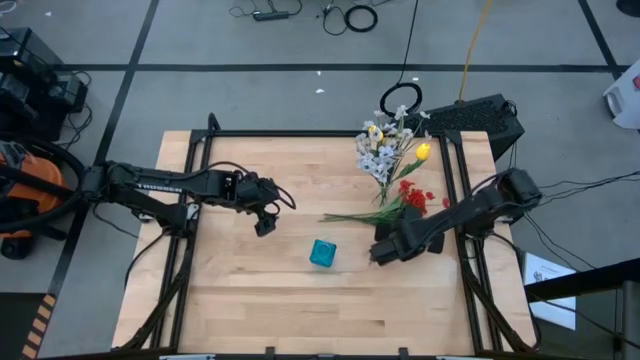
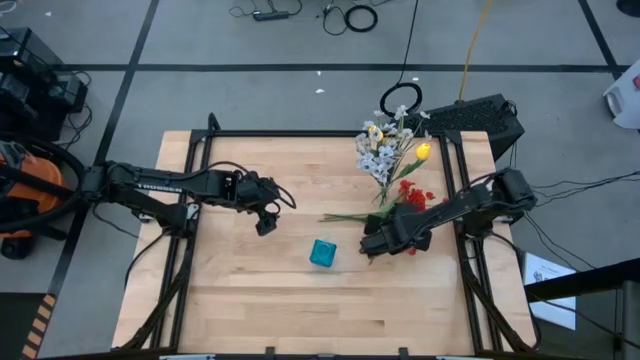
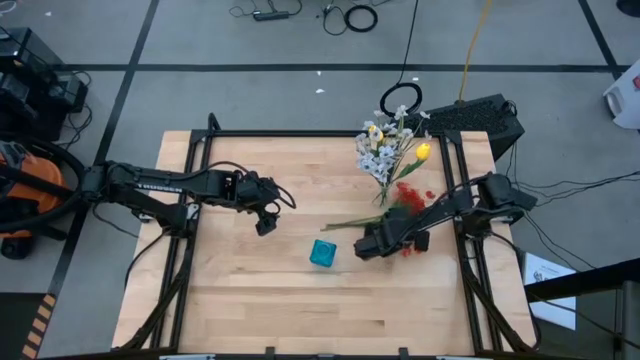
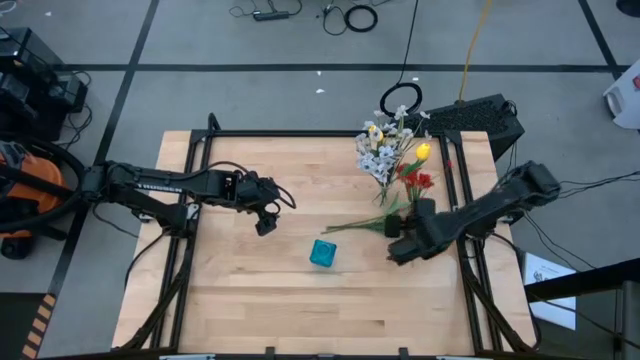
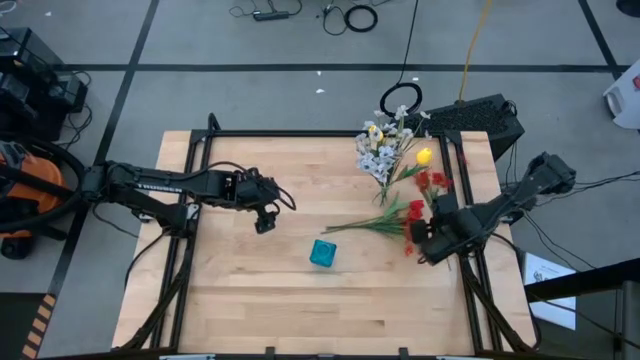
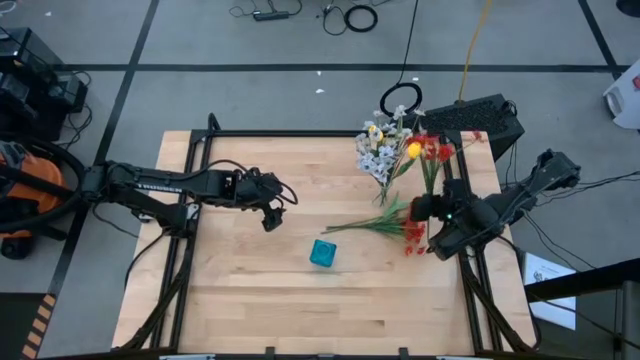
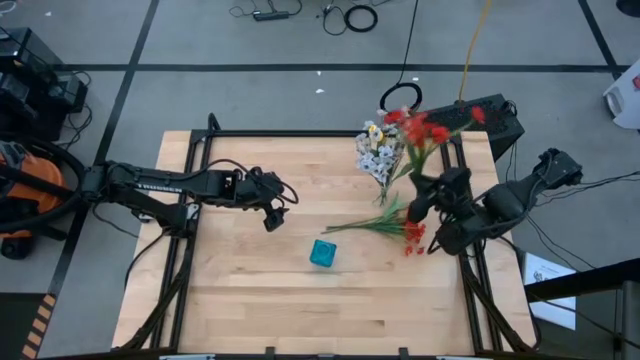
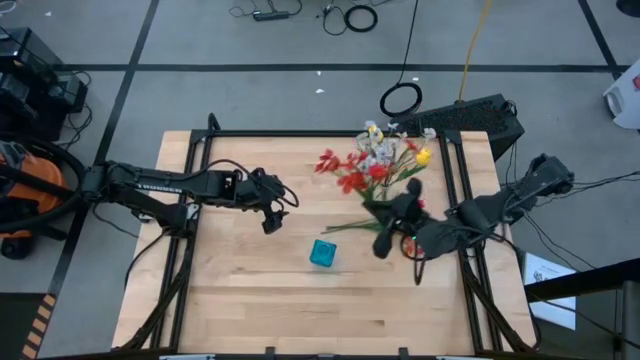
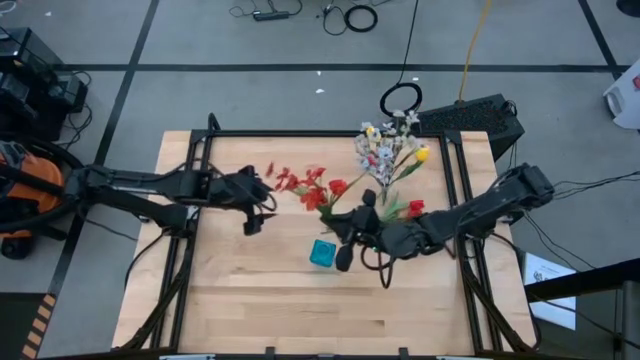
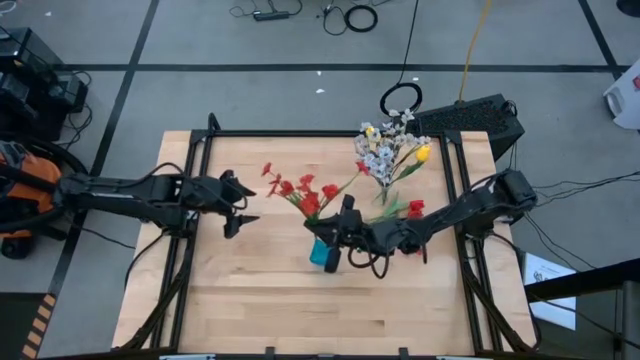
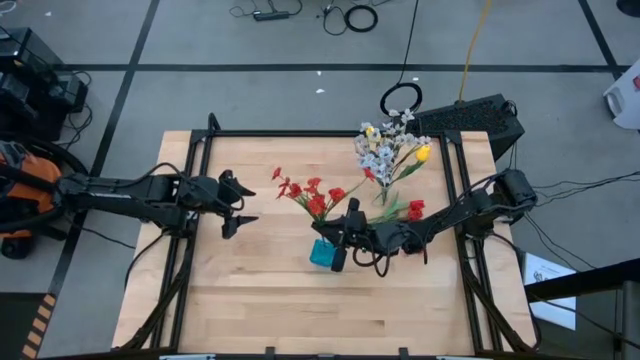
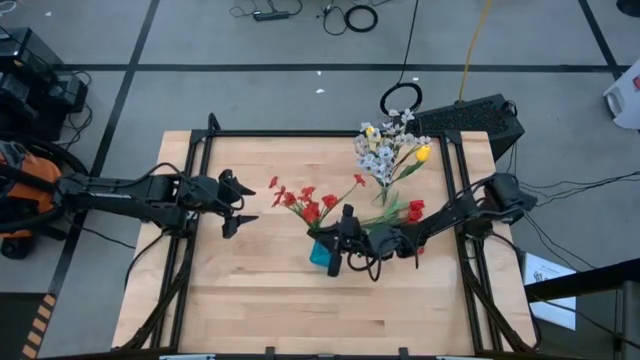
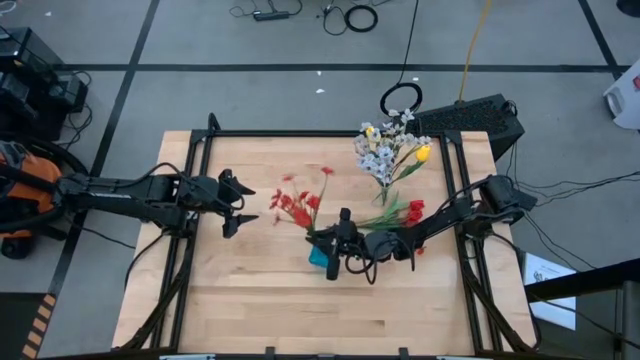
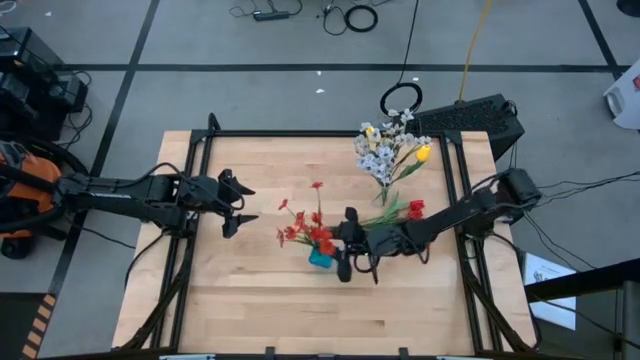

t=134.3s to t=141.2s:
Task: Sort flowers into vase by color
Put the bottom orange flowers into the blue vase

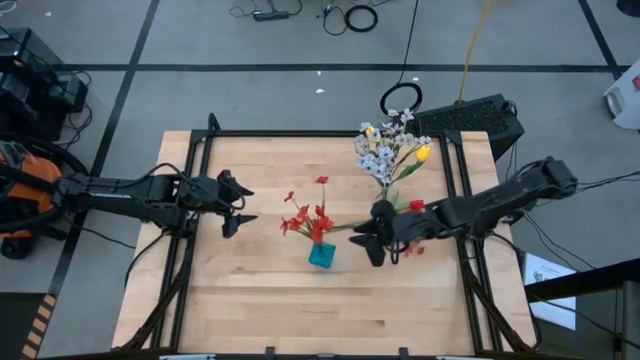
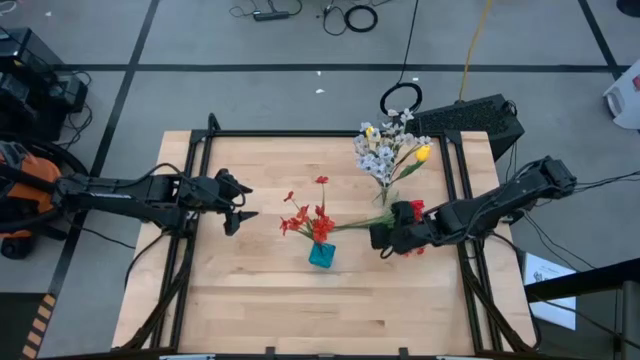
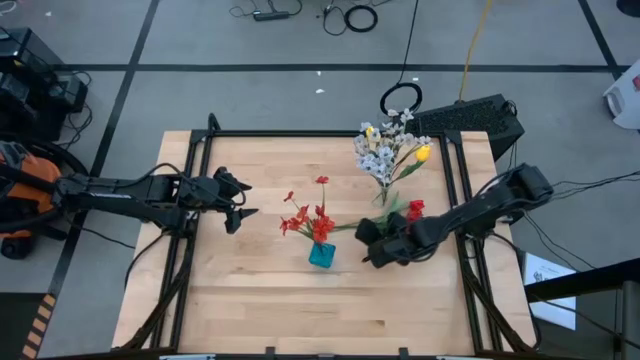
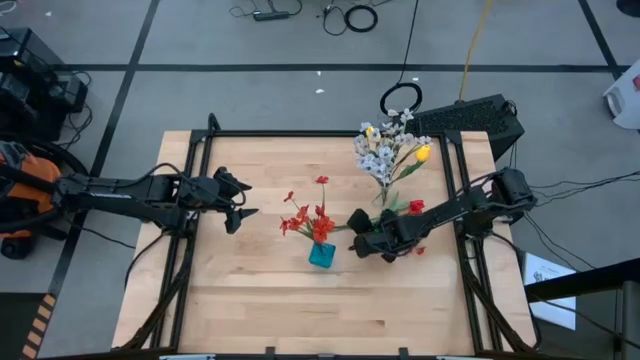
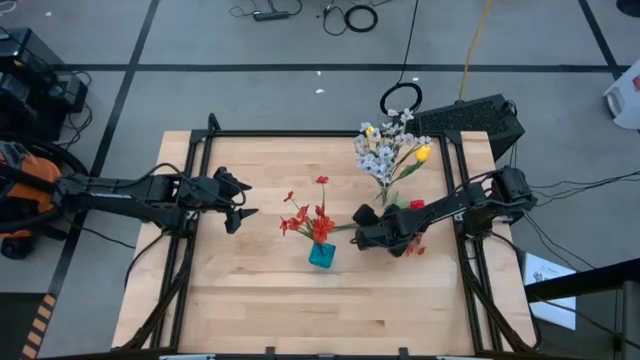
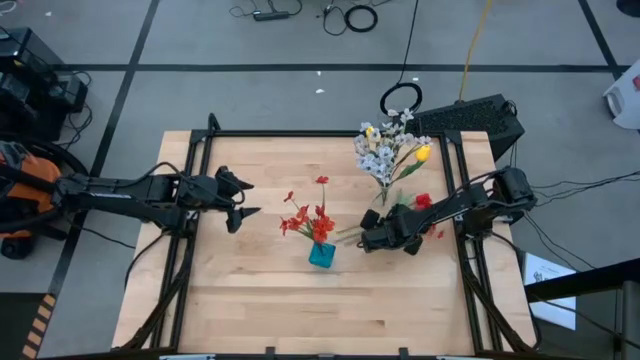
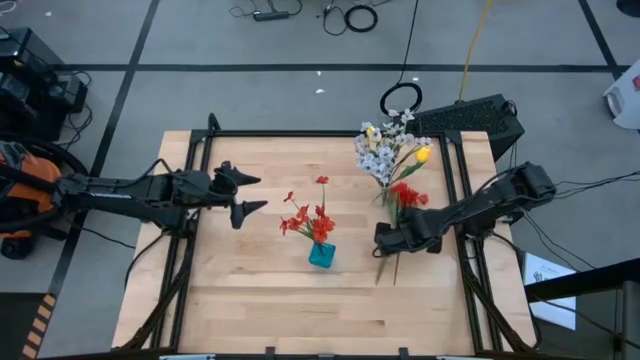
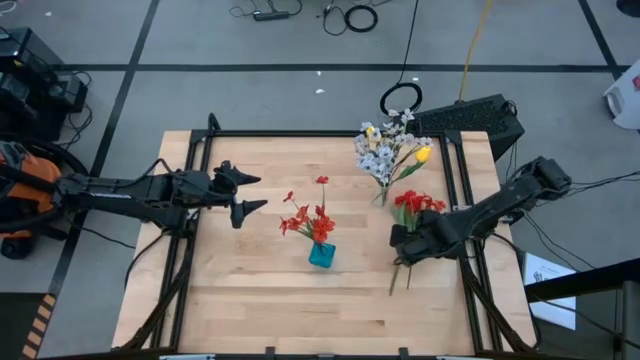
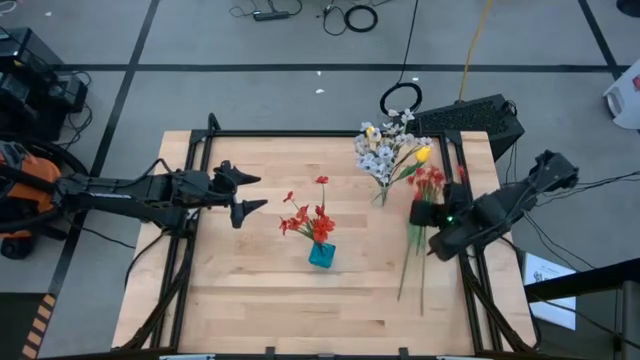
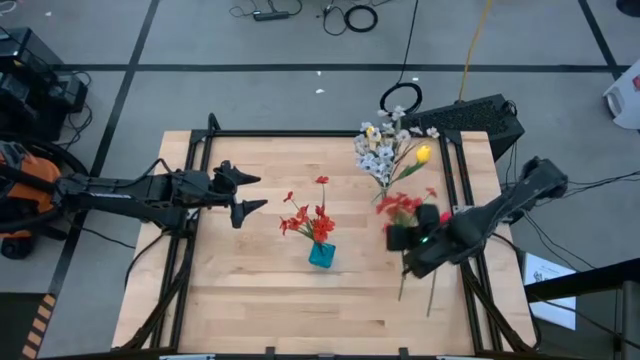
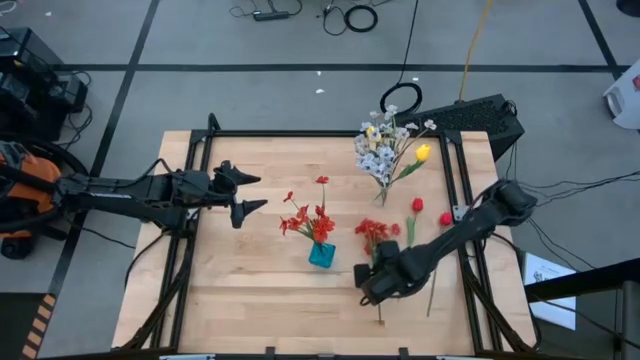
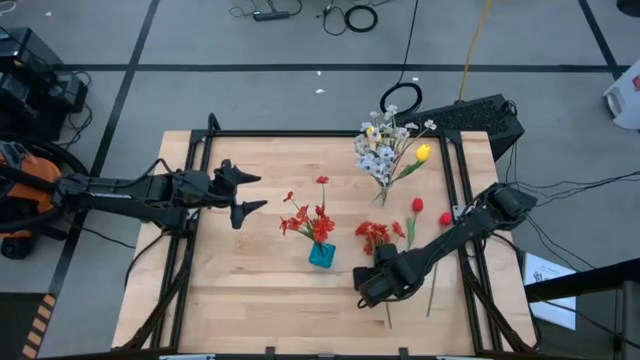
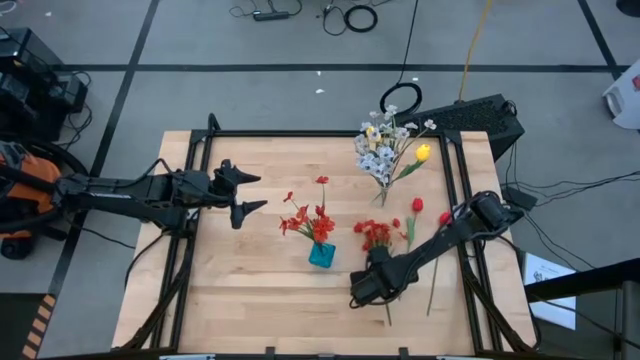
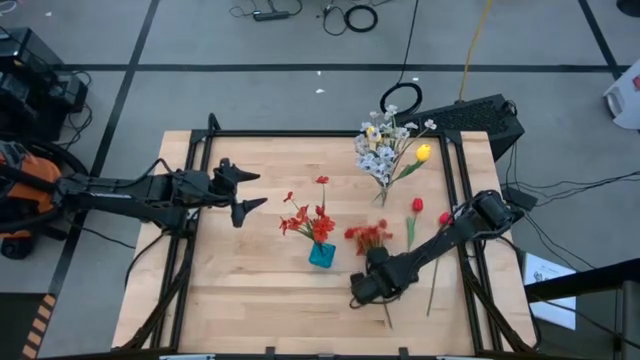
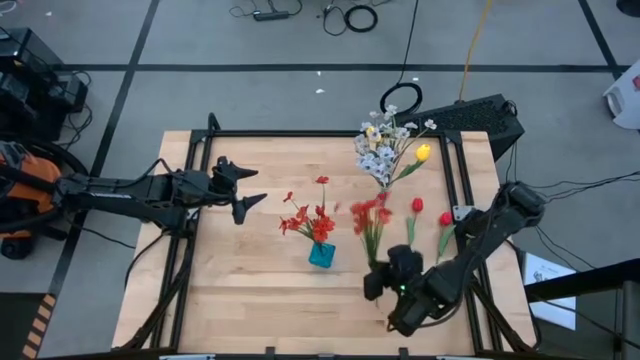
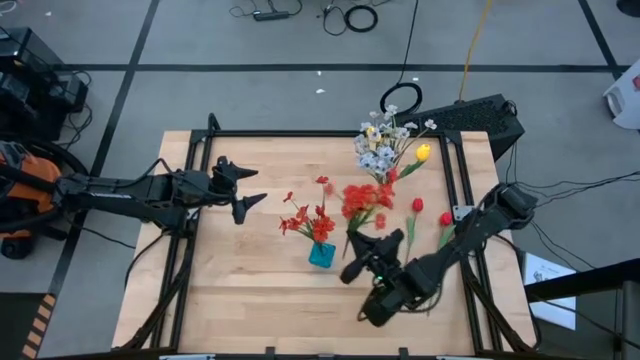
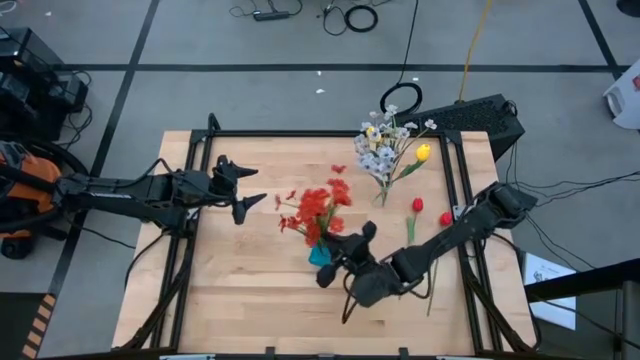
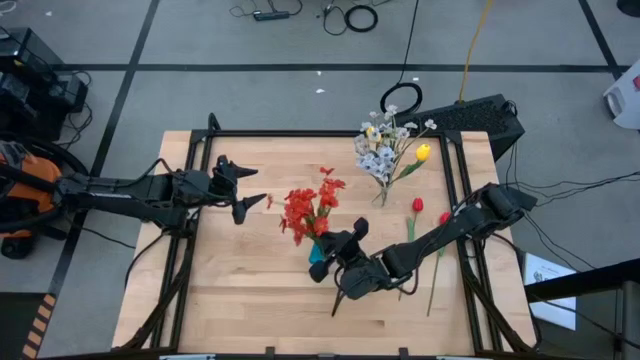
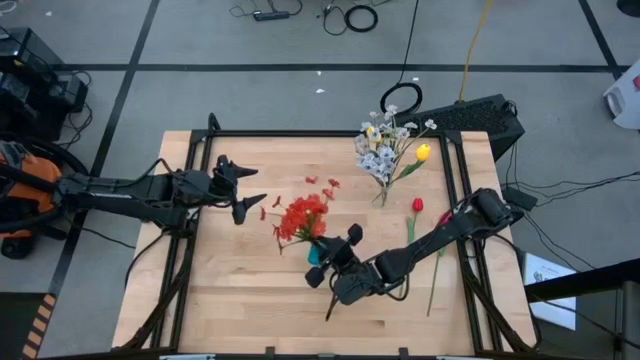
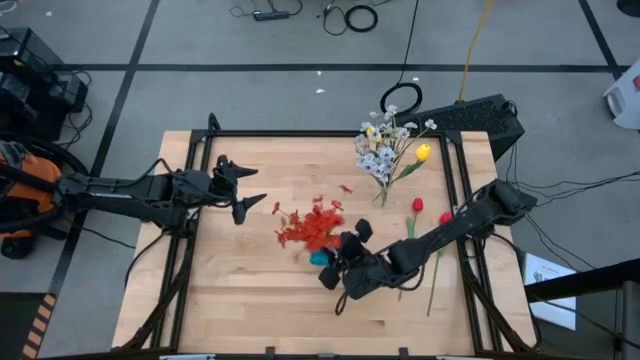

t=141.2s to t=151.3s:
Put the orange flowers into the blue vase

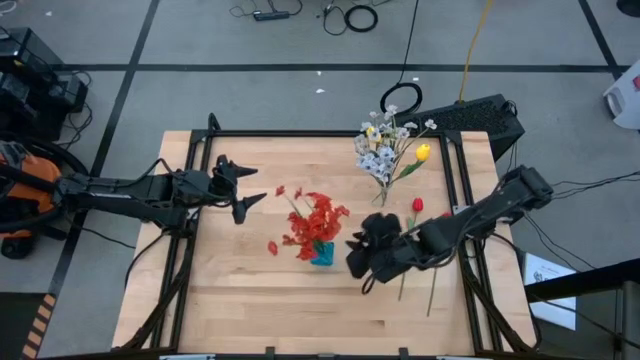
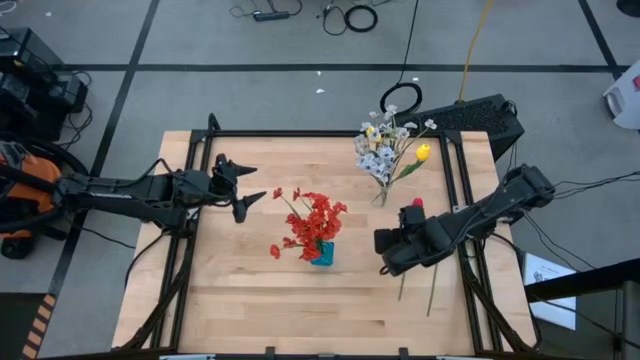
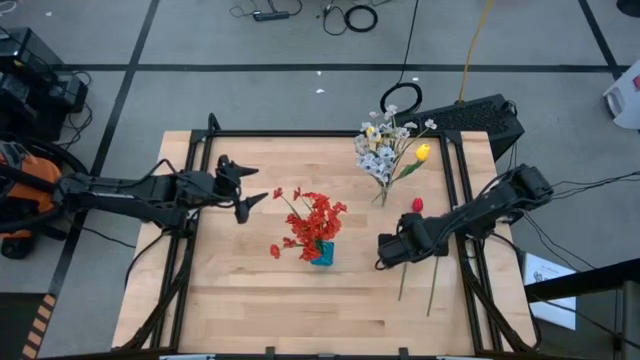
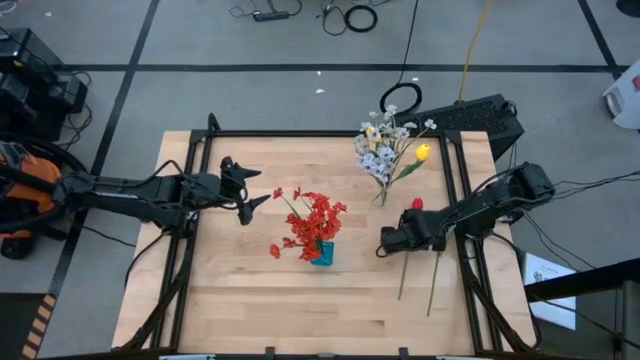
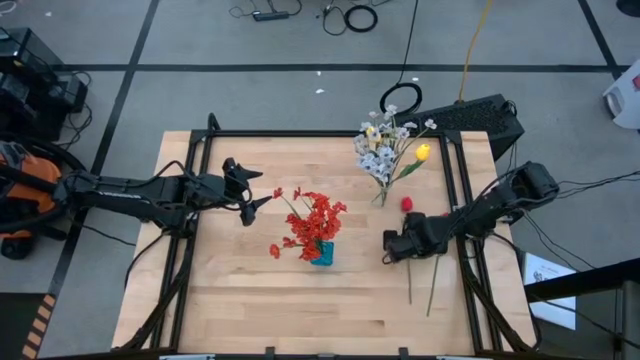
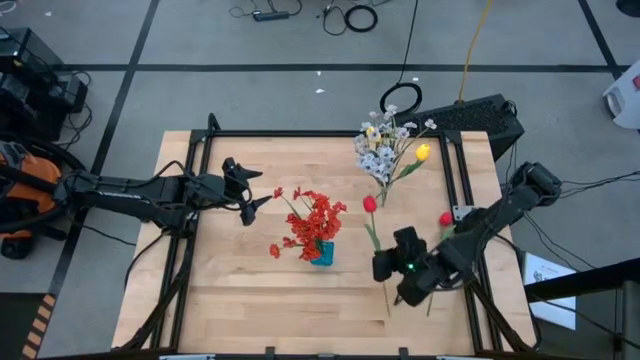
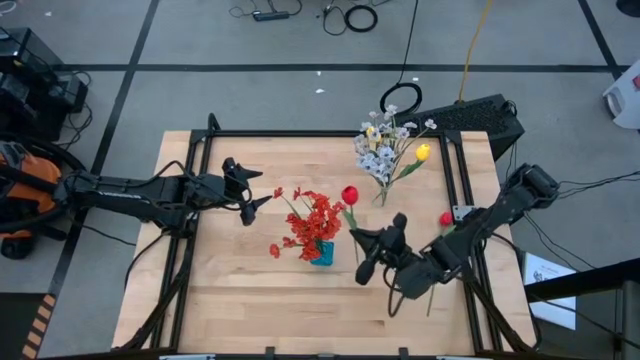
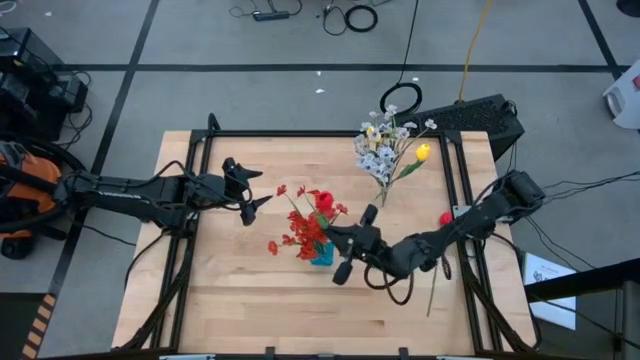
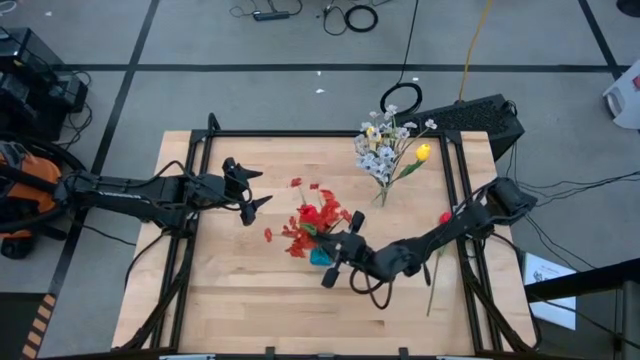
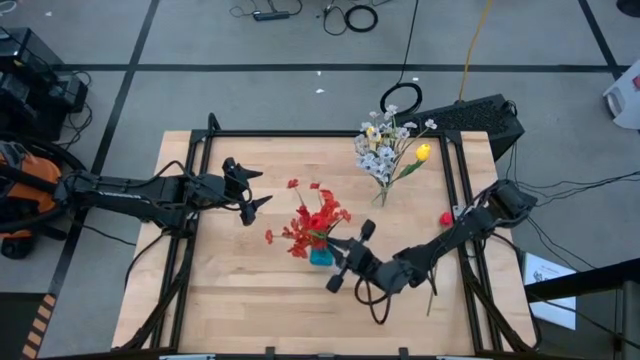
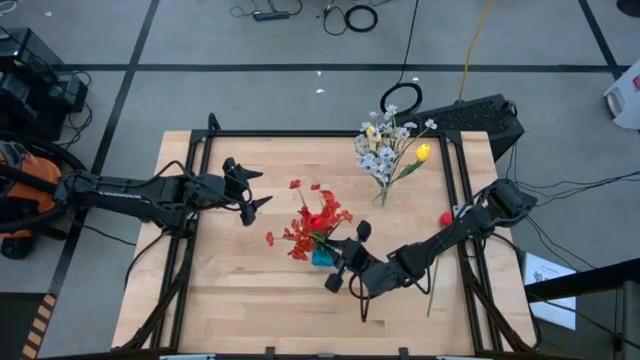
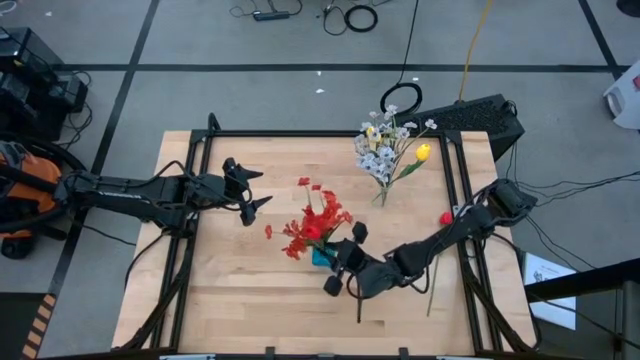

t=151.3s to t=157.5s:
Put the left red flower into the blue vase
